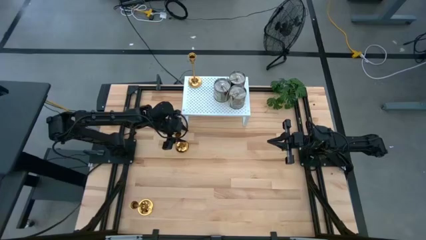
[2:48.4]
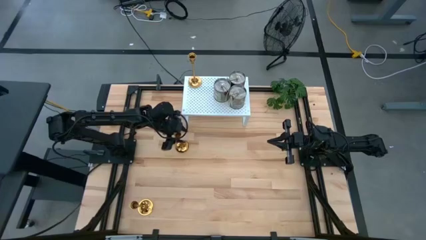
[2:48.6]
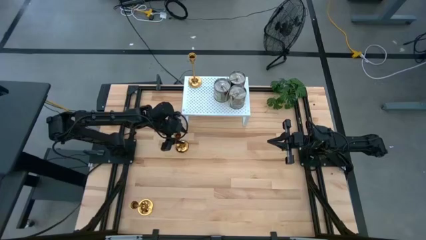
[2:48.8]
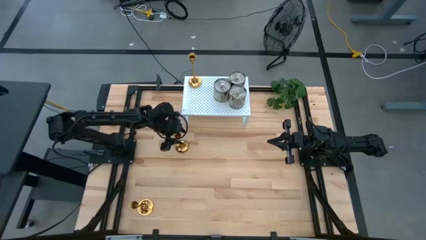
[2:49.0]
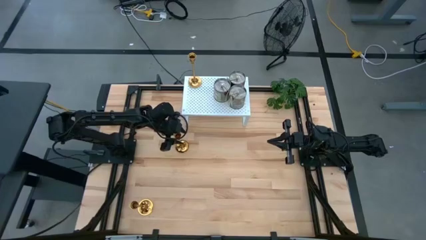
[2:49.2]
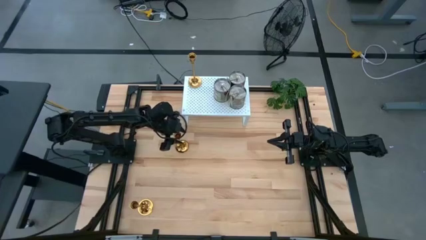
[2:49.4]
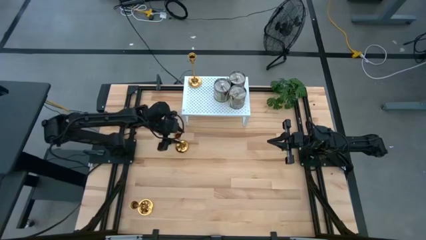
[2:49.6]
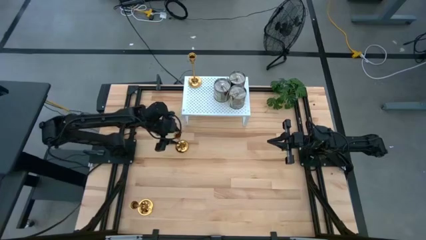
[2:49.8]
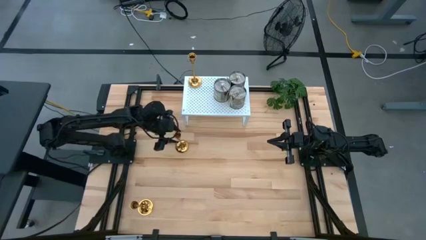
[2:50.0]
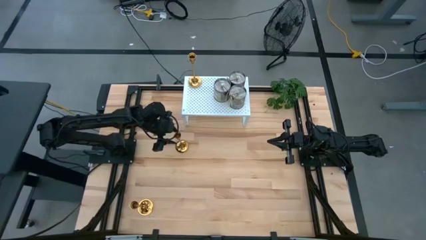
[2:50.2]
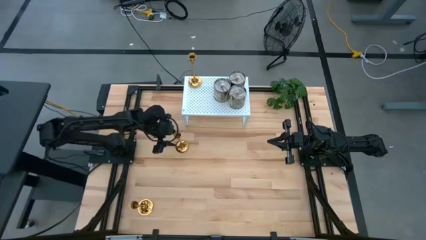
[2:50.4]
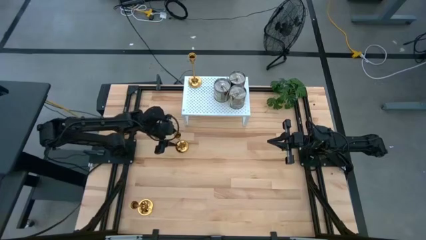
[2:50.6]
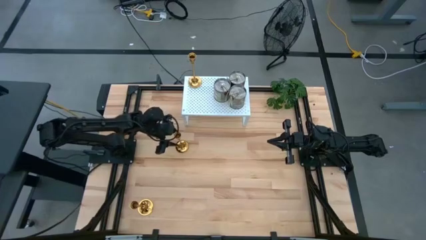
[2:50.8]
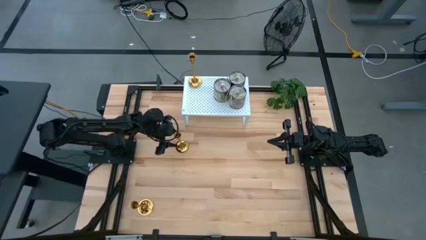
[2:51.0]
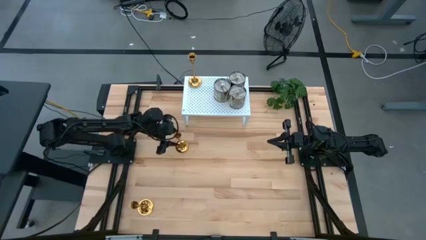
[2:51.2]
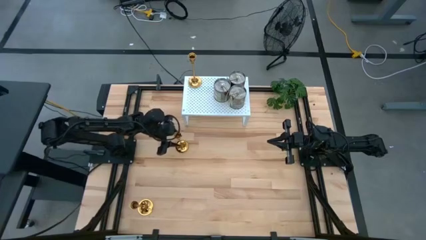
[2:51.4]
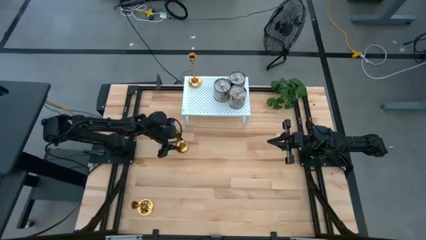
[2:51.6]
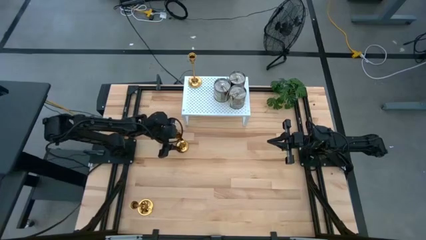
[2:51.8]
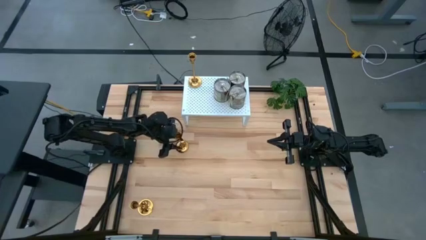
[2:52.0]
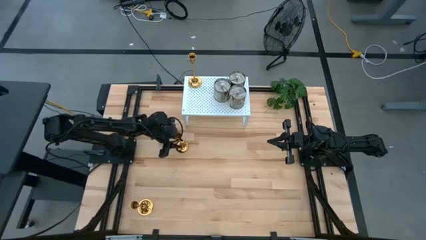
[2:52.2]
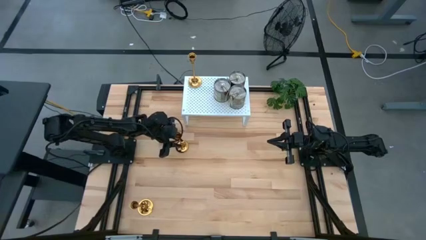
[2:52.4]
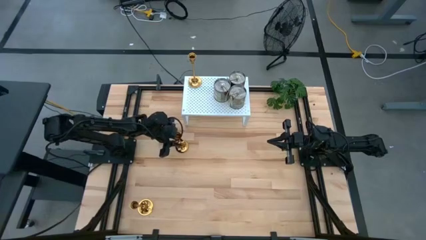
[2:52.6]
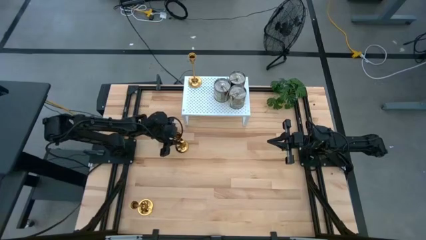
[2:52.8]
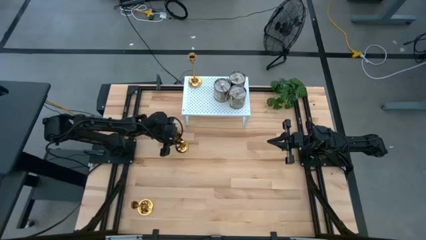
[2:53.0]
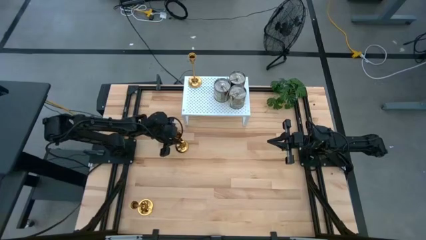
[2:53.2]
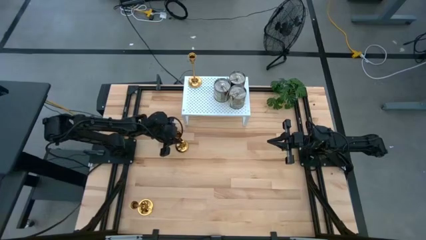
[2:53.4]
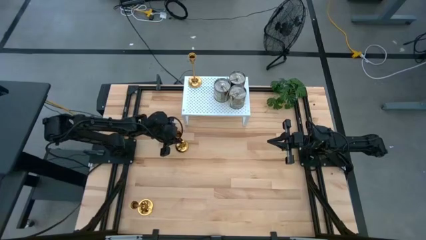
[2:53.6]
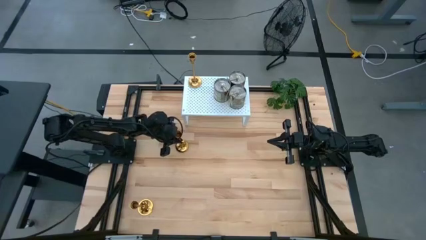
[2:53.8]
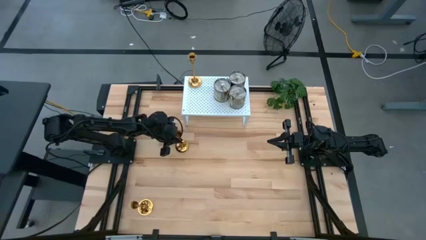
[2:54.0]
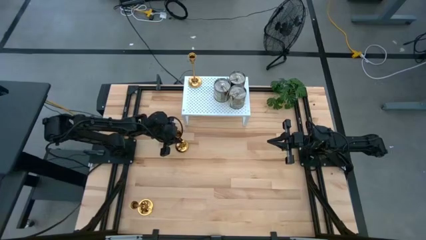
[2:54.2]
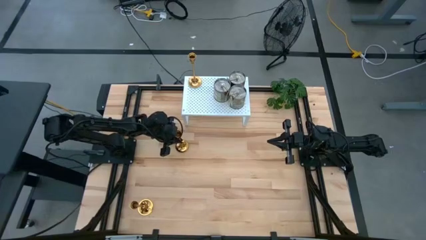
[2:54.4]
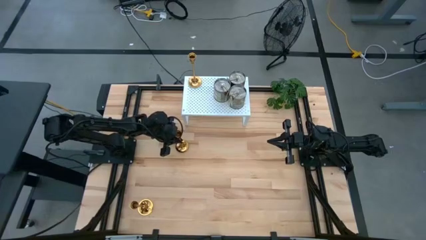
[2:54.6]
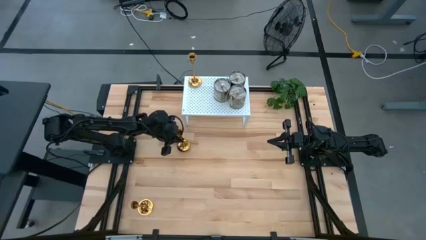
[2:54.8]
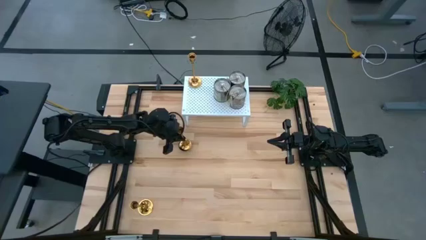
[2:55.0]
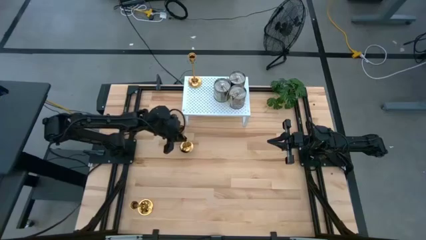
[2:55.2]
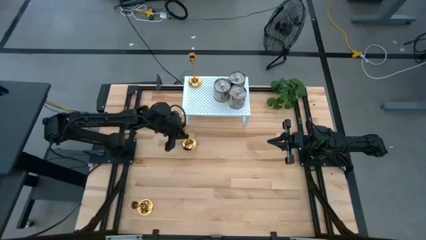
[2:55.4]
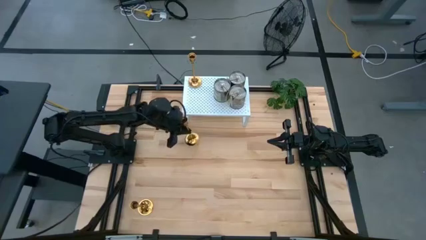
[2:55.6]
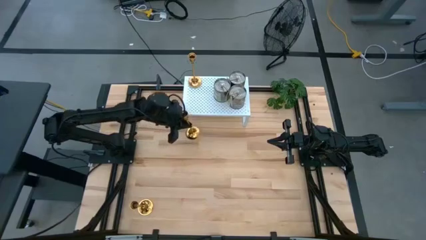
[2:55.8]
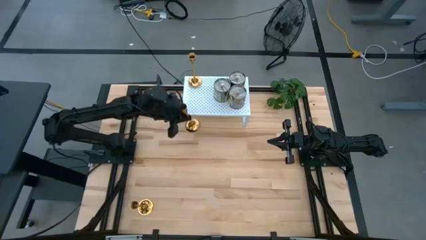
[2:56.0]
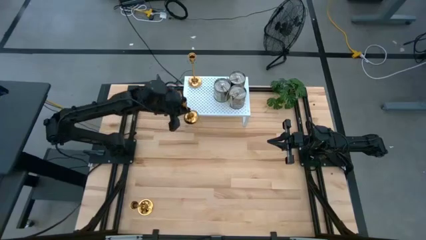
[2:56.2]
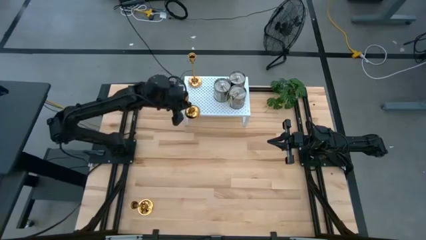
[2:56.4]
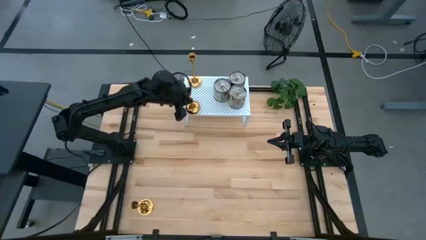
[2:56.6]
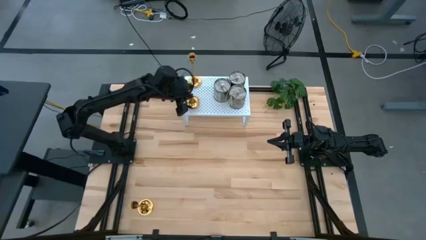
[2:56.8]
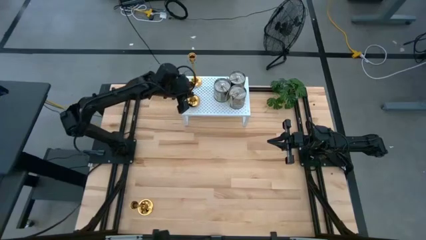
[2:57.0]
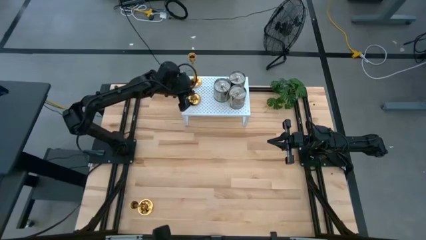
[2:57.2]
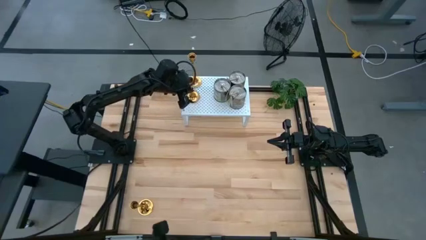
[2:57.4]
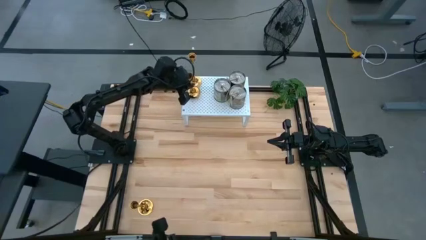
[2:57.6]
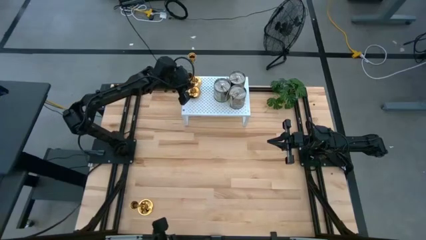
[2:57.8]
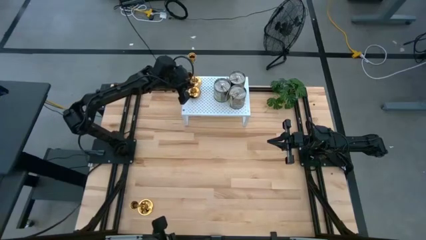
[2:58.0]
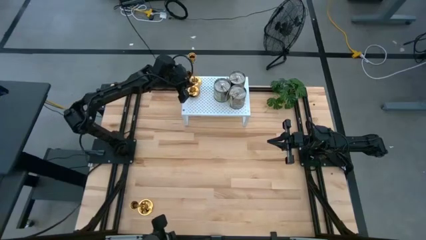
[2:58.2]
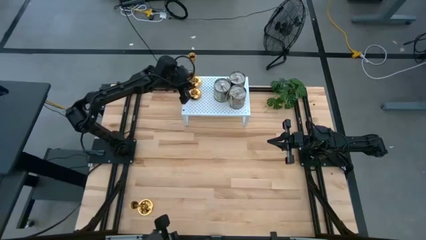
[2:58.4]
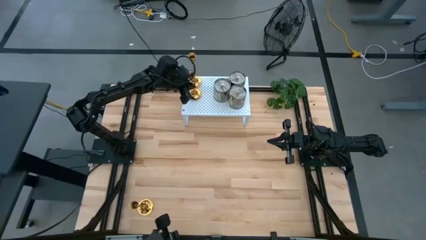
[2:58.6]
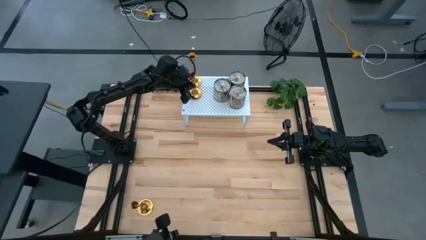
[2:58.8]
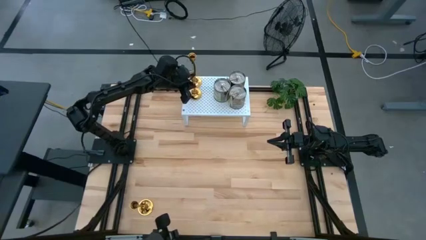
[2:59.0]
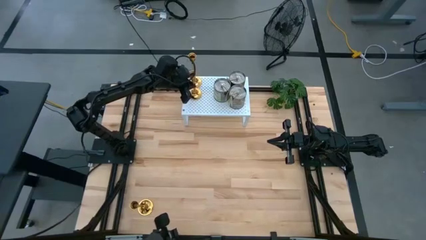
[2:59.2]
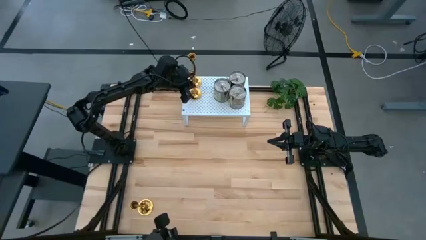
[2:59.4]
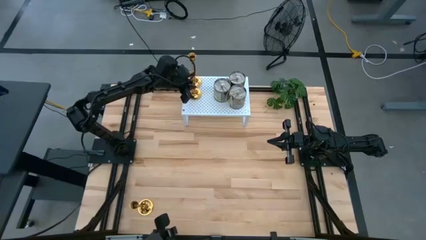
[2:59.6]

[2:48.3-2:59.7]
Task: Pick & Place candle stick holders
Put the top candle holder aligned with the other candle holder on the shelf

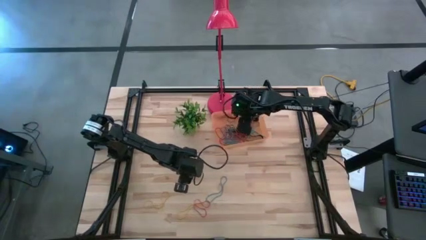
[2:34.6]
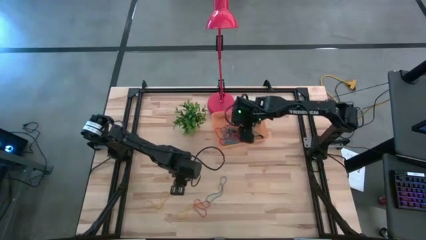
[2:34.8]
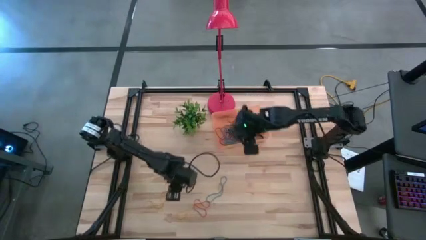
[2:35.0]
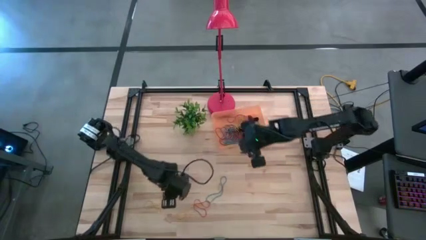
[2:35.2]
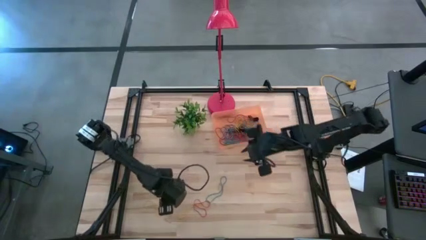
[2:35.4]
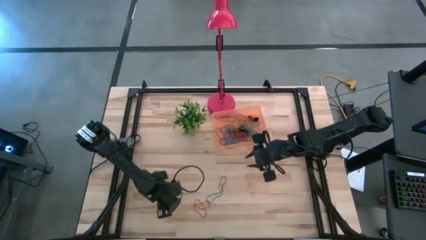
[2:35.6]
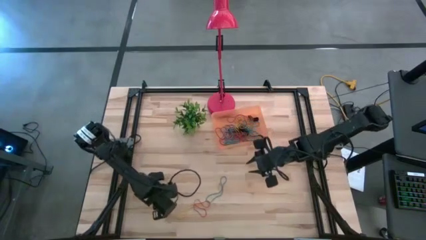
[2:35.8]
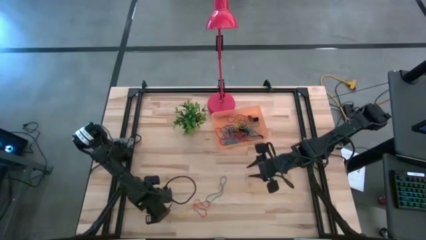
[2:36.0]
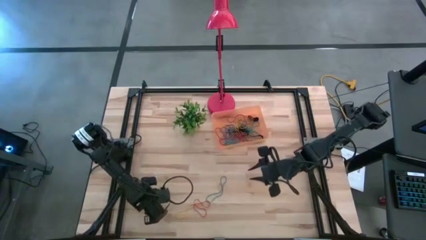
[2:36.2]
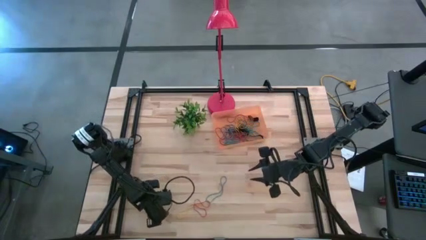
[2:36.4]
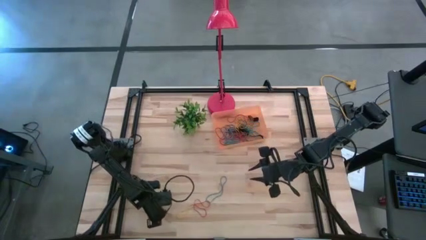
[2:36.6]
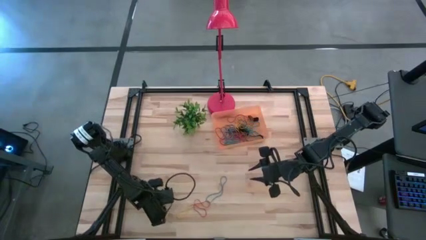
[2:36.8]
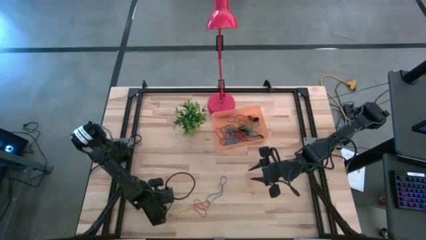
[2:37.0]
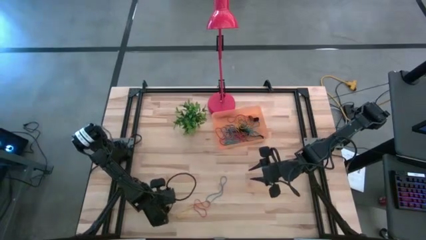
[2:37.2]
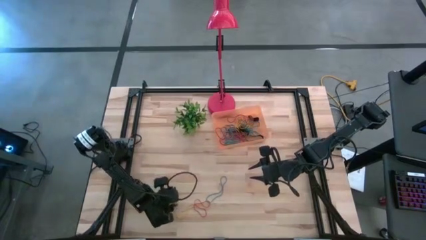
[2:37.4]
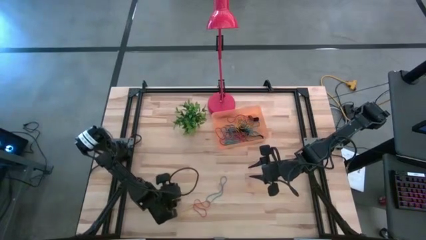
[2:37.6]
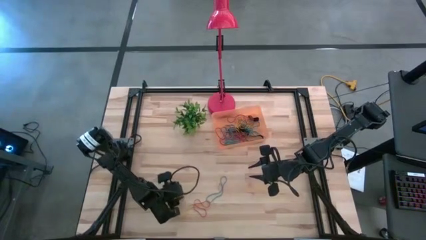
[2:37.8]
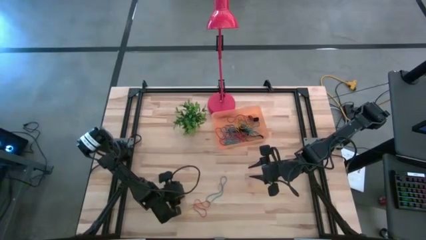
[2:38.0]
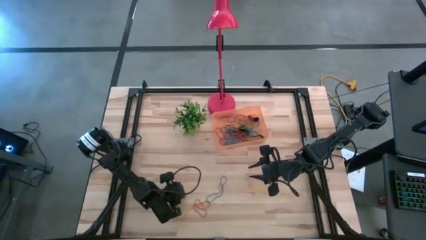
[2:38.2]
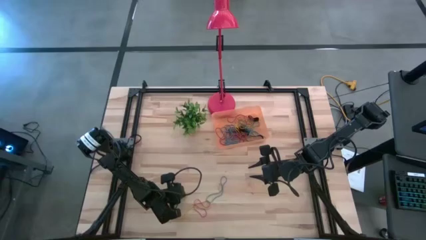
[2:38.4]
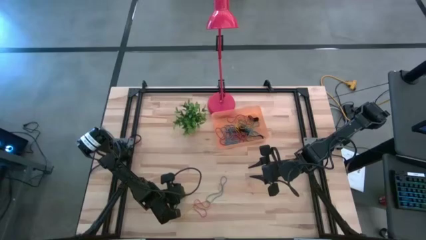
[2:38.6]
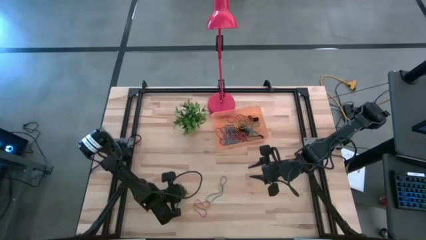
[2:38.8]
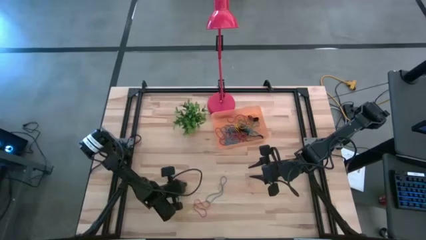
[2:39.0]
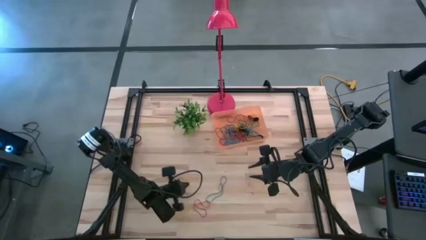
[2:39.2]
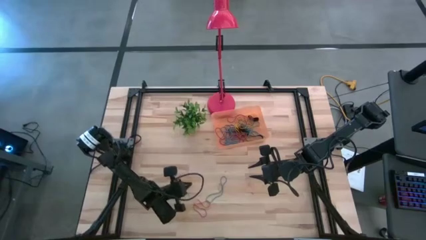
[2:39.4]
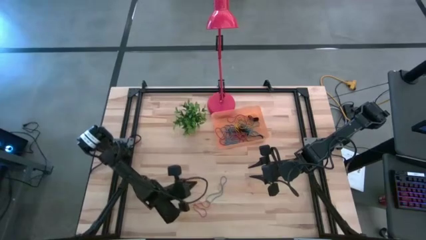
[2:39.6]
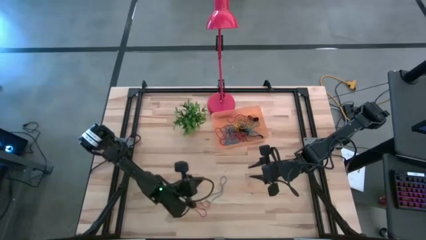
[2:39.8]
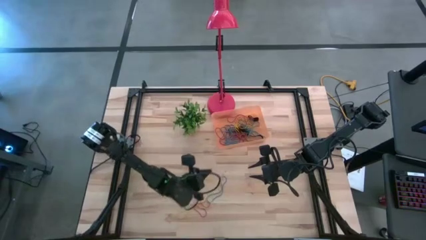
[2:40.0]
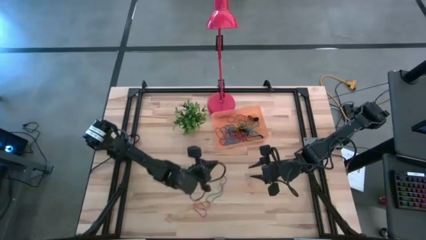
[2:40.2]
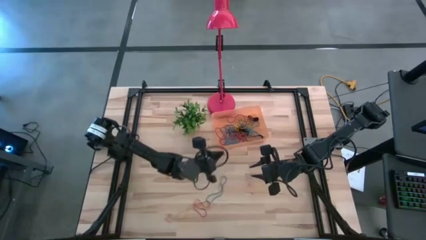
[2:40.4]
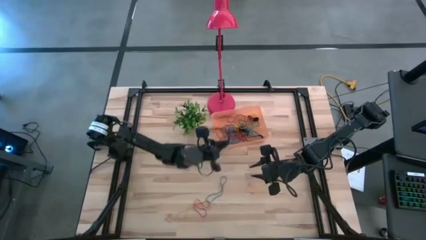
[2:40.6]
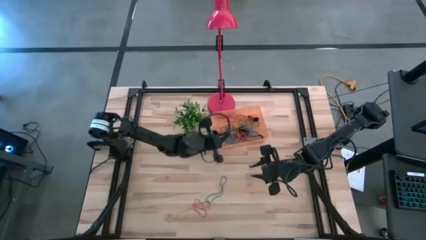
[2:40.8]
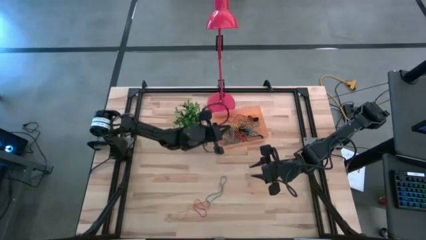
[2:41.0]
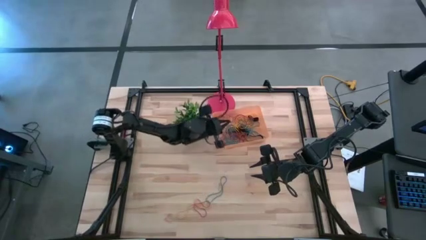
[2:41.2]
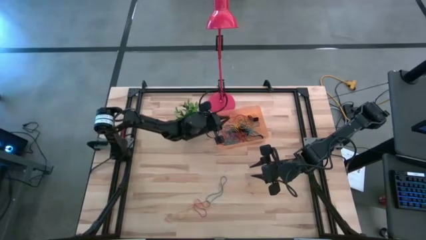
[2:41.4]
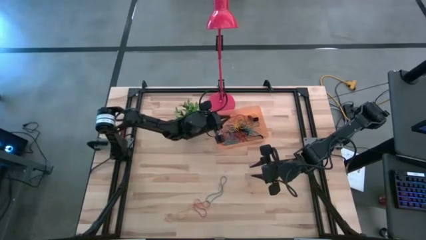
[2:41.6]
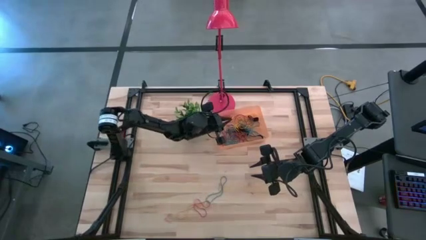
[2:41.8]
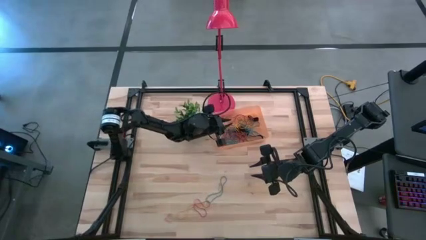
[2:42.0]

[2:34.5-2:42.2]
Task: Pick and place rubber bands into bin
Put the left yellow rubberband into the orange container
